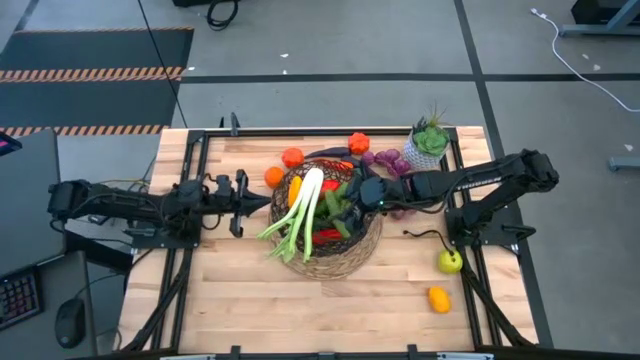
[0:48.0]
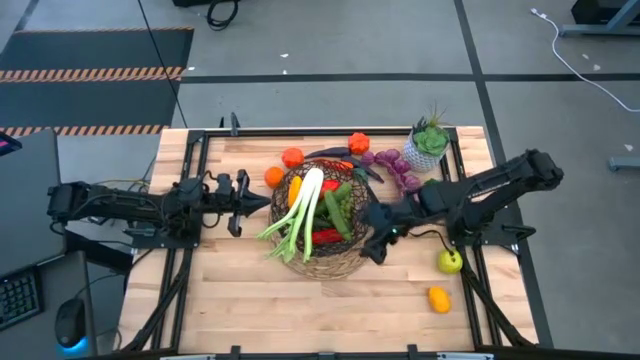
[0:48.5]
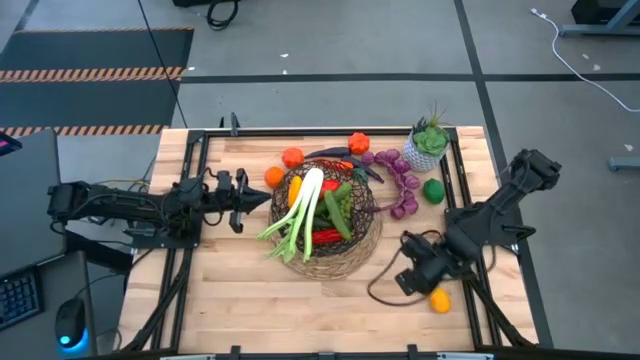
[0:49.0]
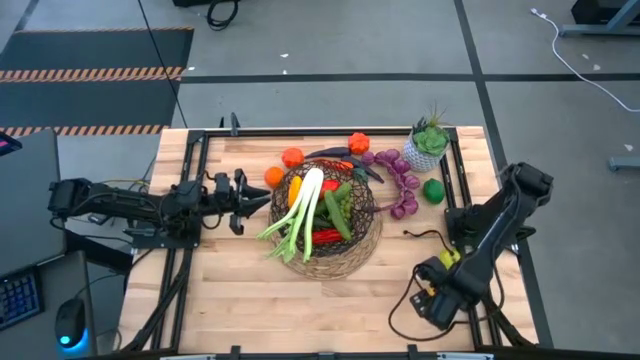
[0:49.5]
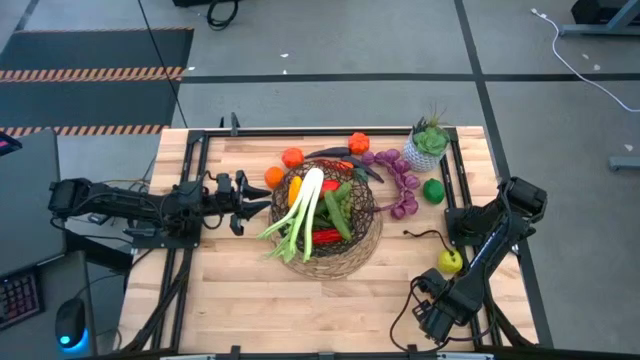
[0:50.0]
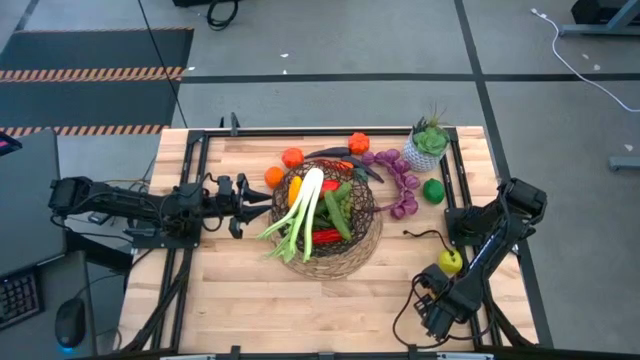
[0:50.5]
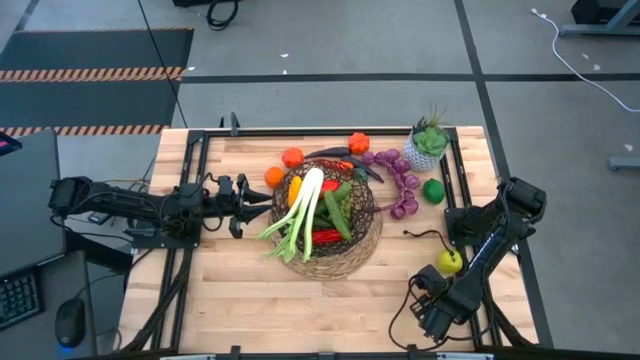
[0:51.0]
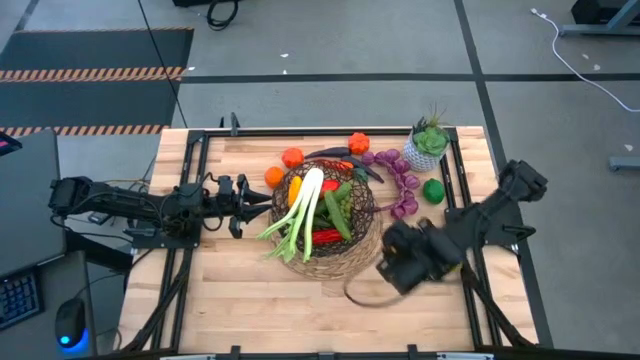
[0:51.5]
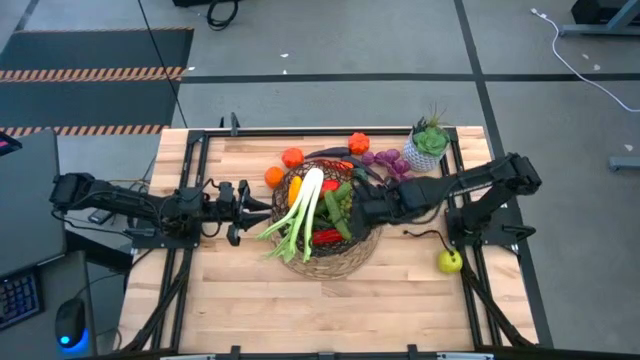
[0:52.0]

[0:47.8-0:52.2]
Task: Build produce basket
Put the yellow lemon into the black basket

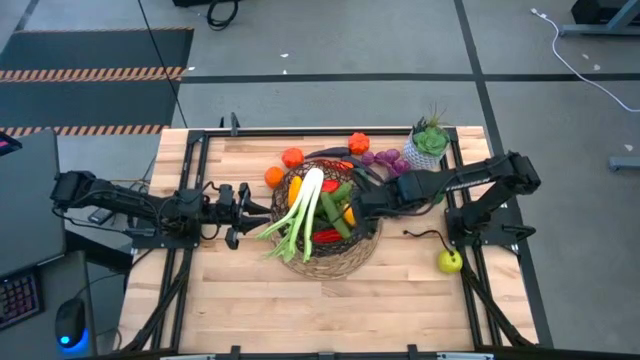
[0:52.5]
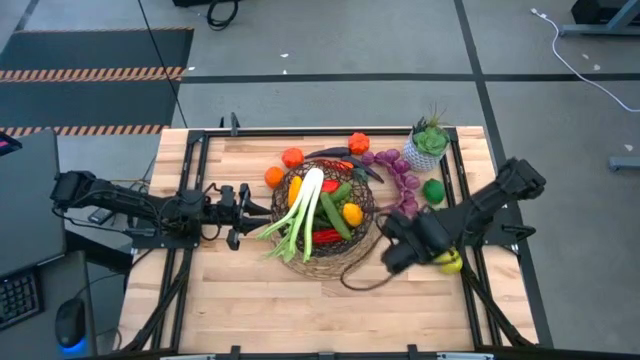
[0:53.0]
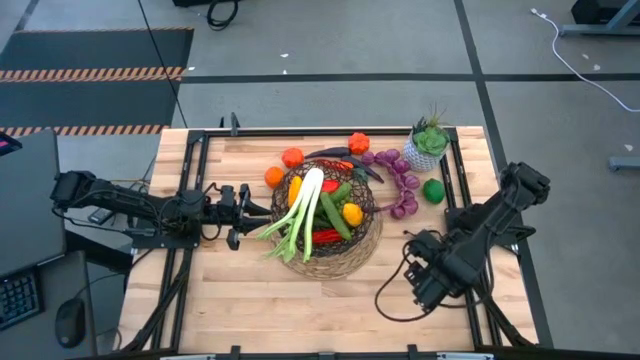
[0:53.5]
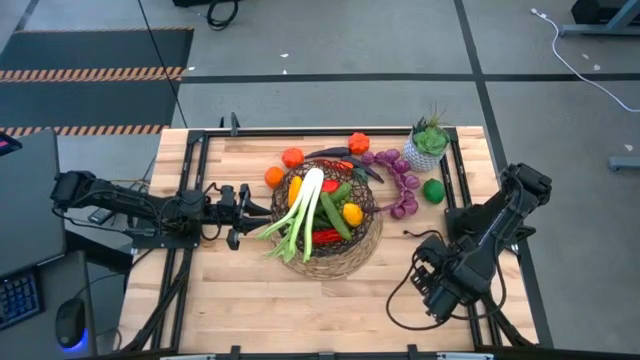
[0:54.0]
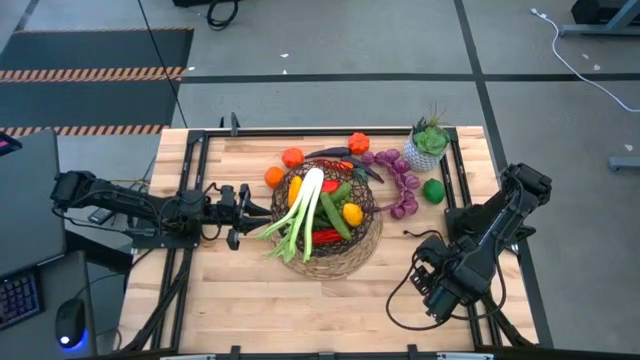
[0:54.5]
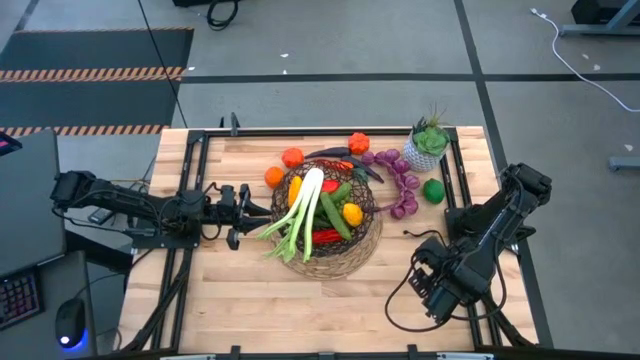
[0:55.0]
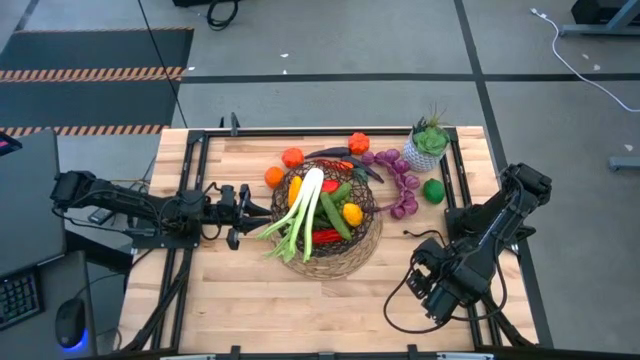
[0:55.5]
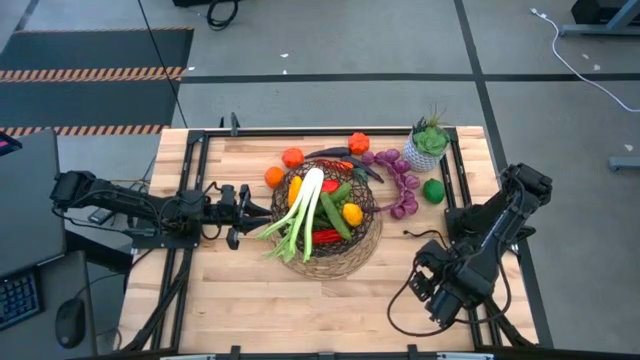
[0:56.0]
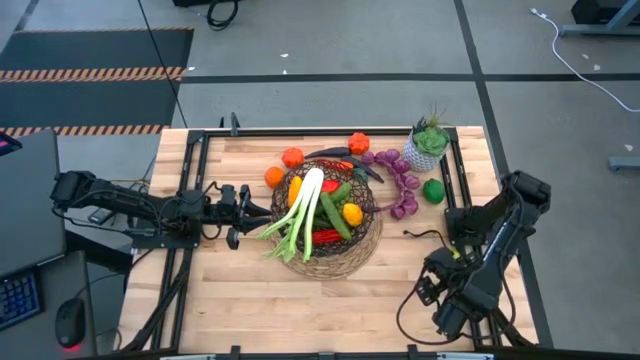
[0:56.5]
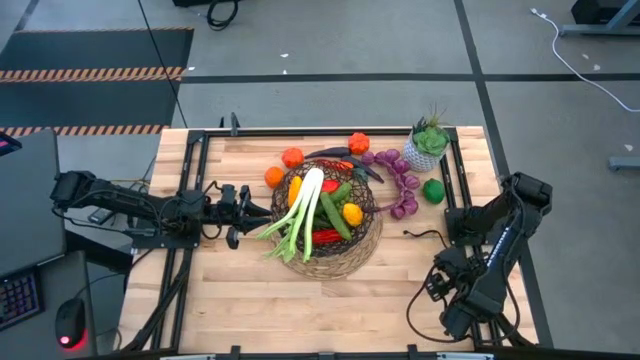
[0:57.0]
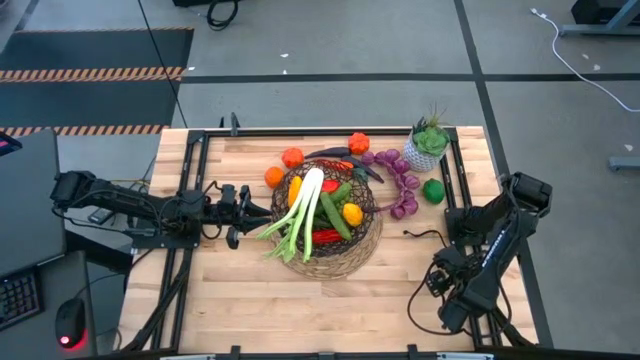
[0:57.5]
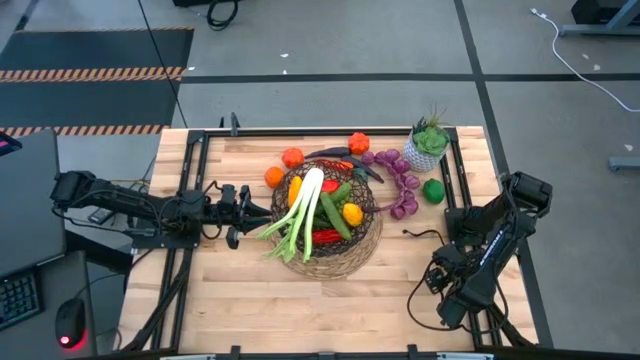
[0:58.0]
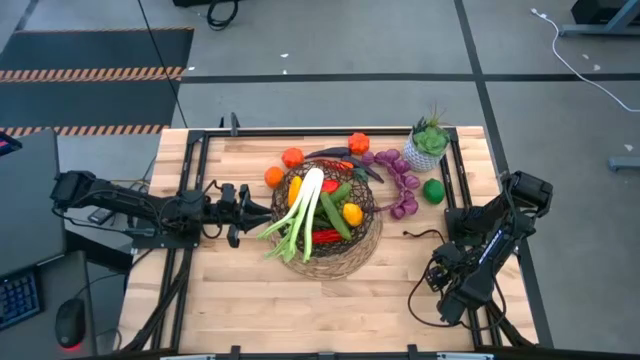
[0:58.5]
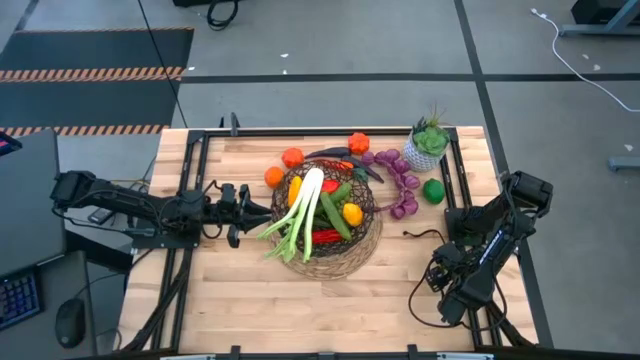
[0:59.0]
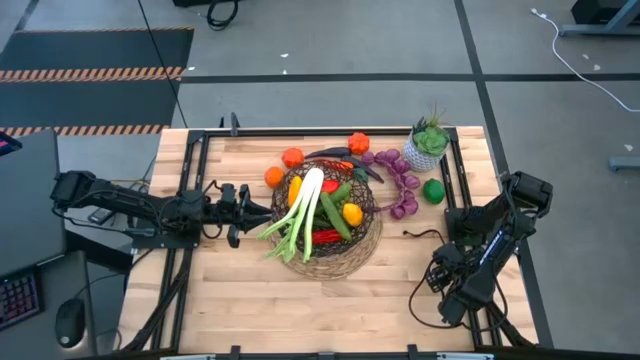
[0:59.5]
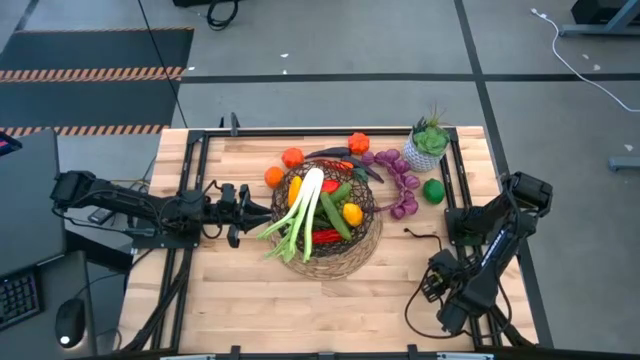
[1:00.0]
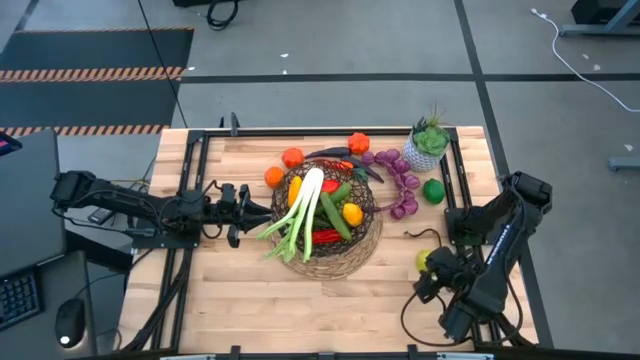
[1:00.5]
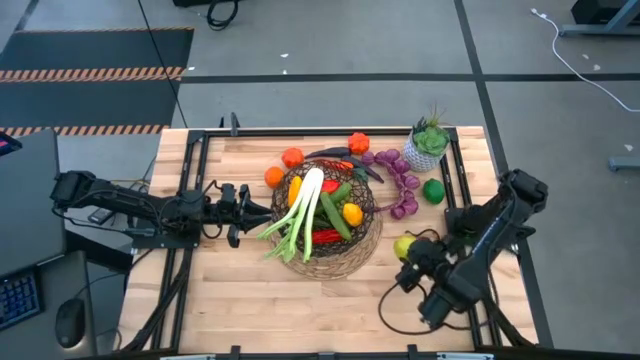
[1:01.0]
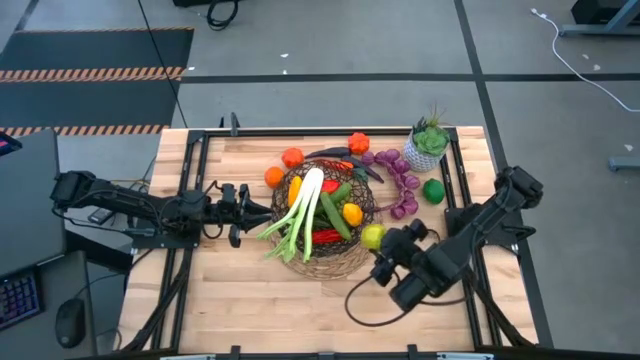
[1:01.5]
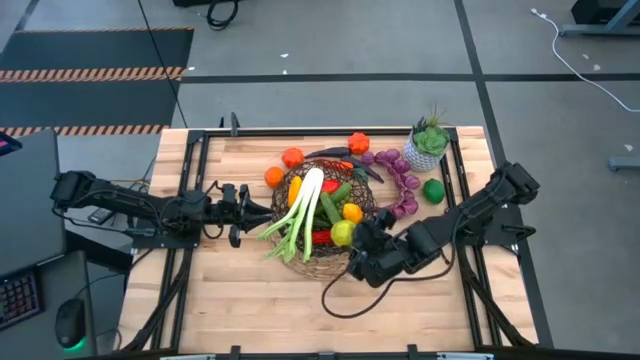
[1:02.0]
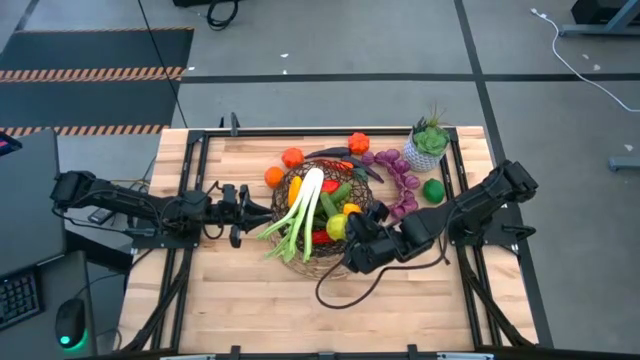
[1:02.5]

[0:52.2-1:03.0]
Put the green guava into the black basket

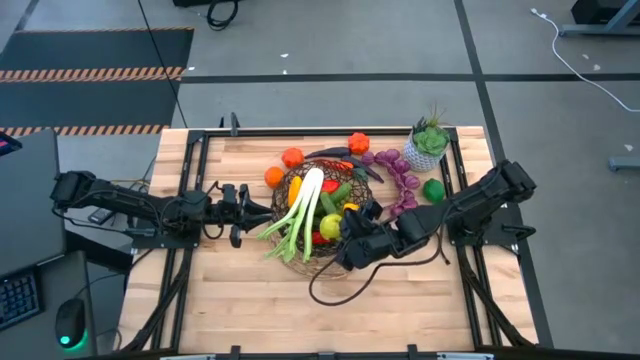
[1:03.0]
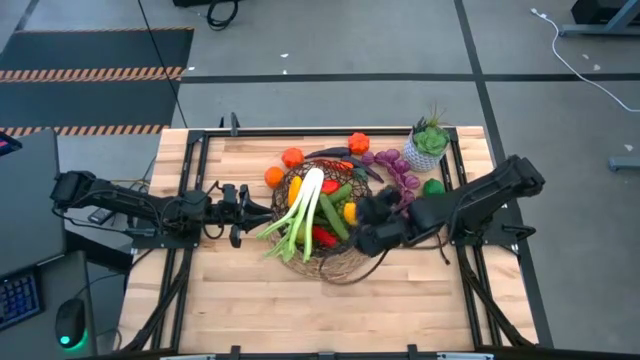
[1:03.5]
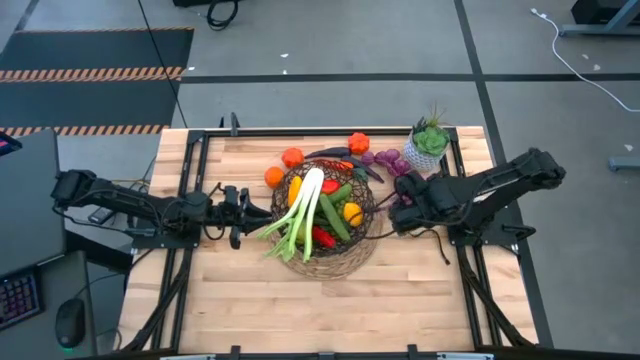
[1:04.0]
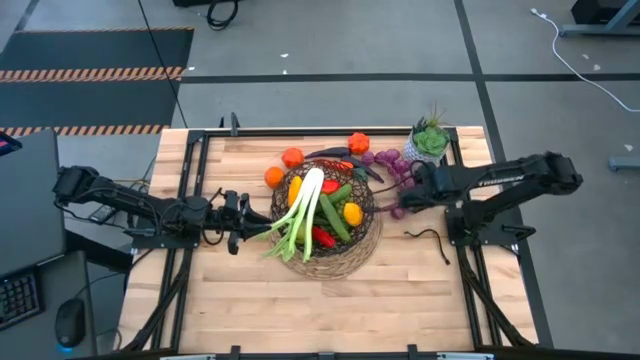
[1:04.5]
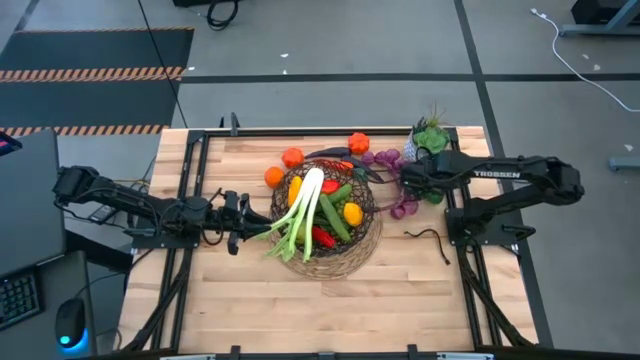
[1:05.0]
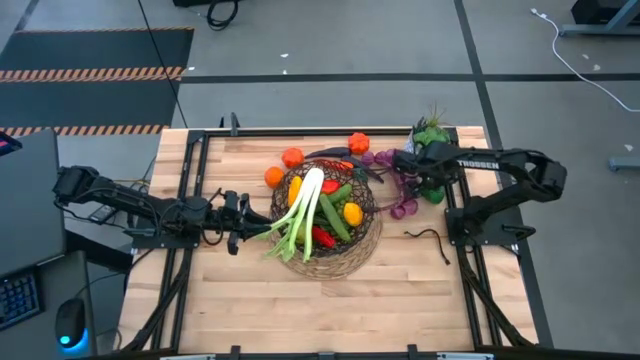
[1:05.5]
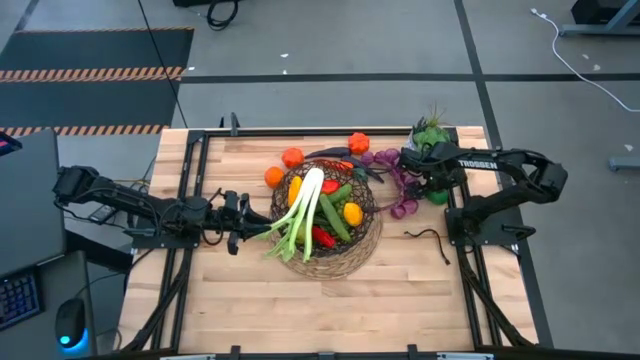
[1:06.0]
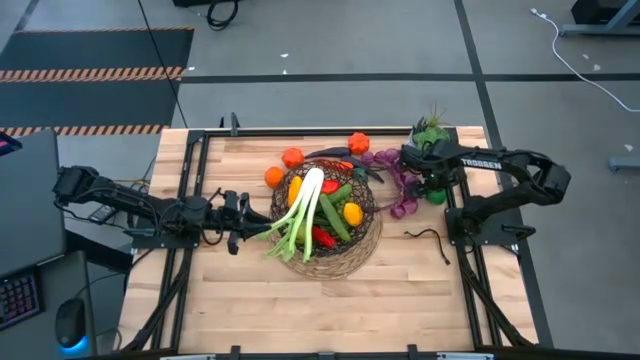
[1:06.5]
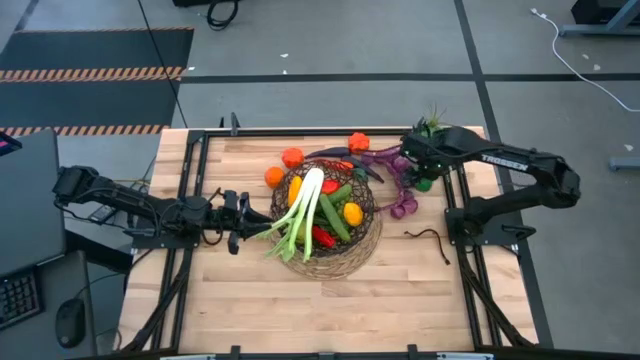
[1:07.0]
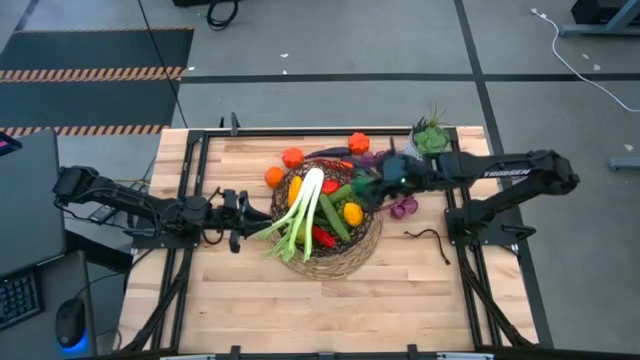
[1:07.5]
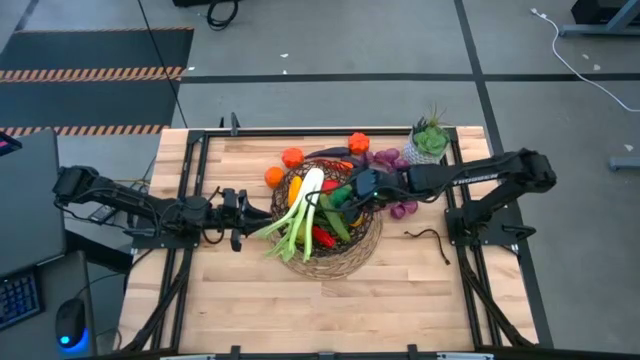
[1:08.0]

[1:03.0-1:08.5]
Put the green lime into the black basket
